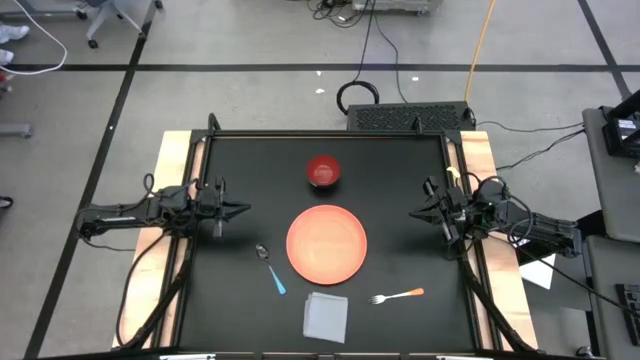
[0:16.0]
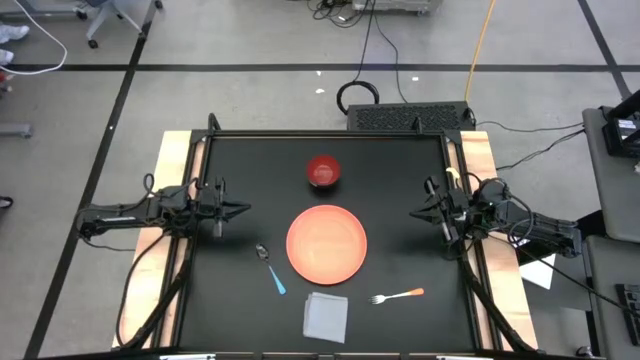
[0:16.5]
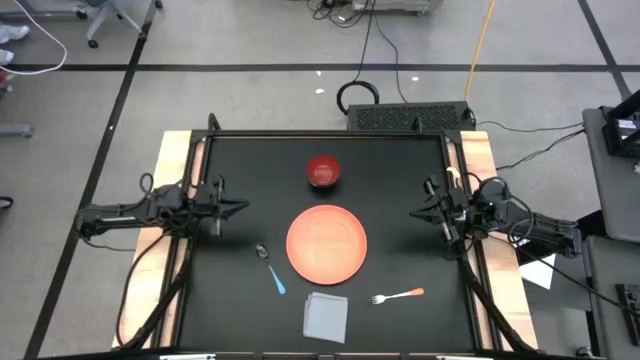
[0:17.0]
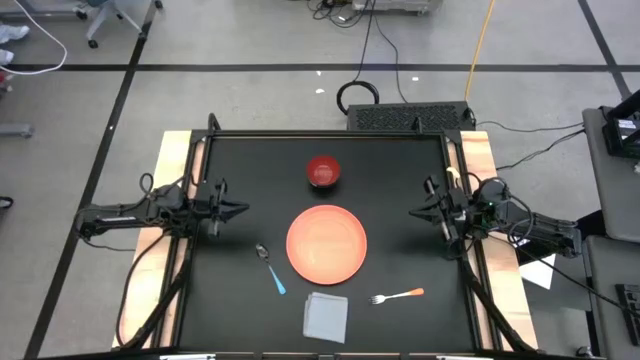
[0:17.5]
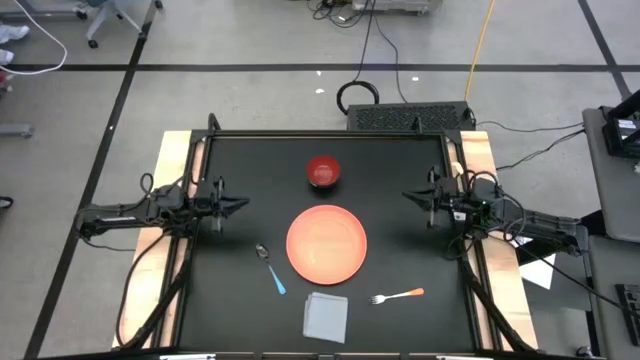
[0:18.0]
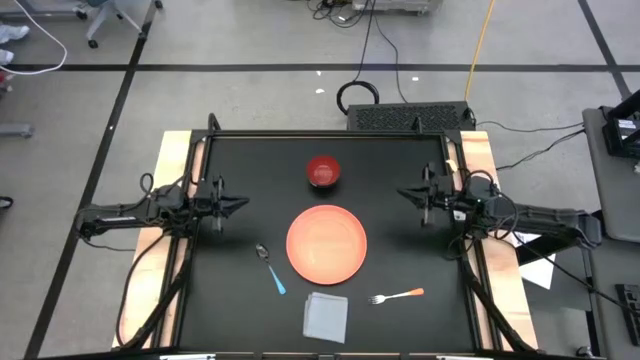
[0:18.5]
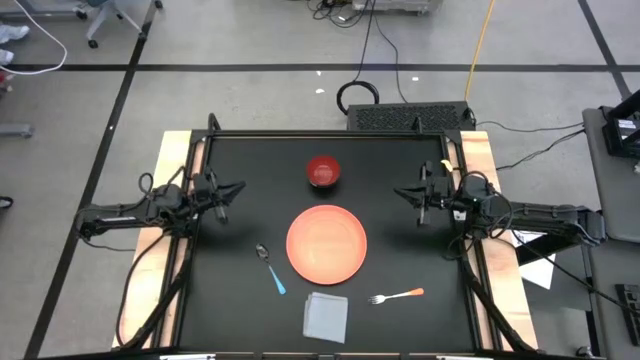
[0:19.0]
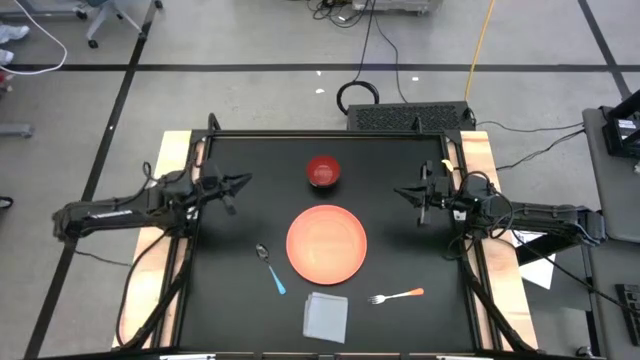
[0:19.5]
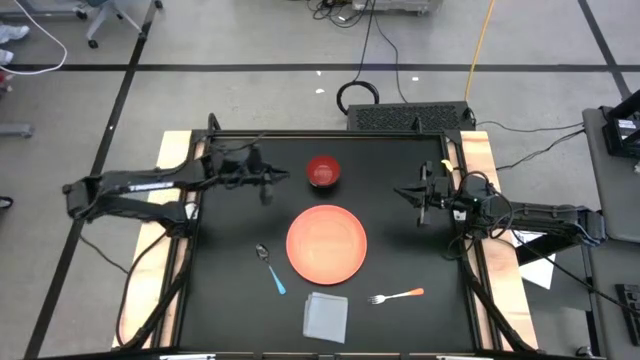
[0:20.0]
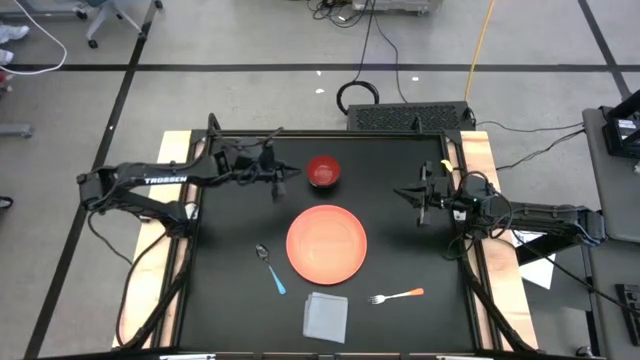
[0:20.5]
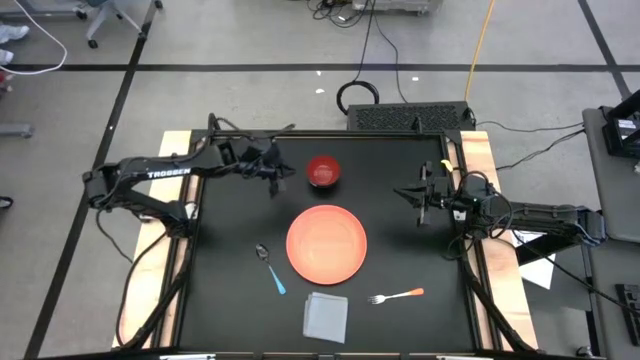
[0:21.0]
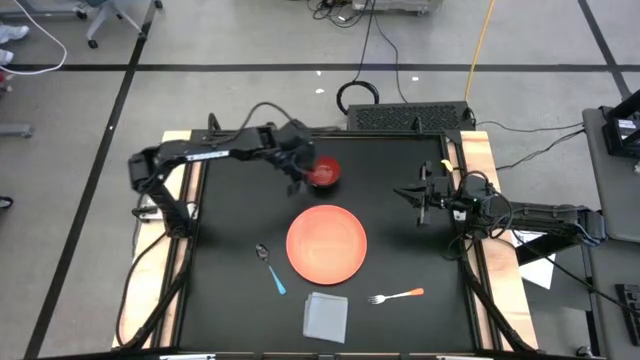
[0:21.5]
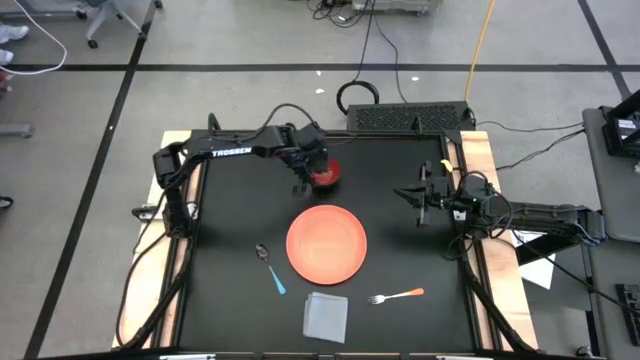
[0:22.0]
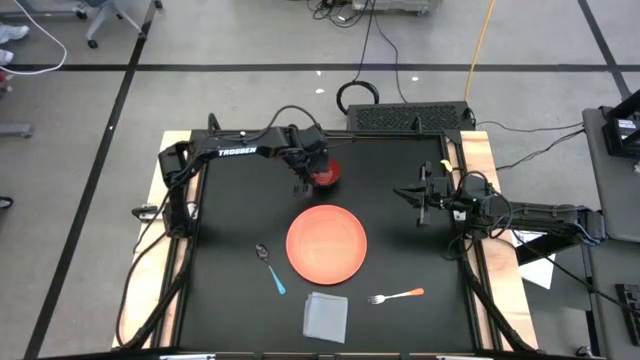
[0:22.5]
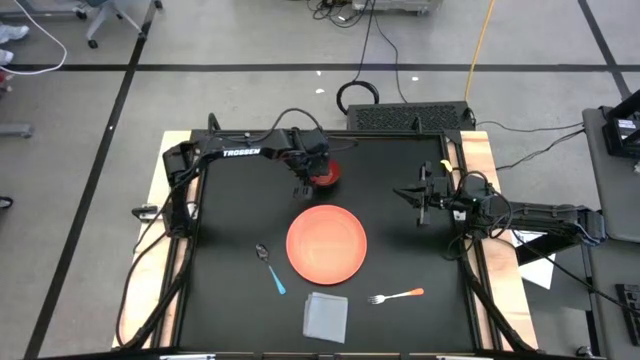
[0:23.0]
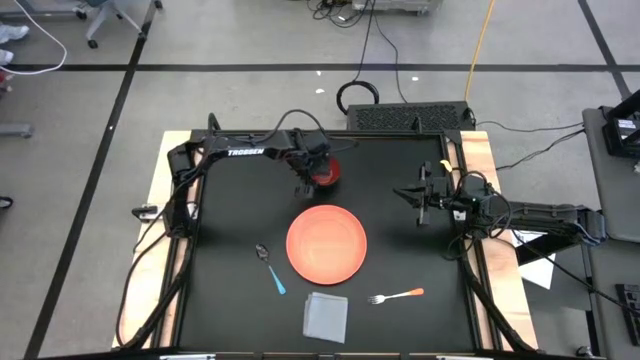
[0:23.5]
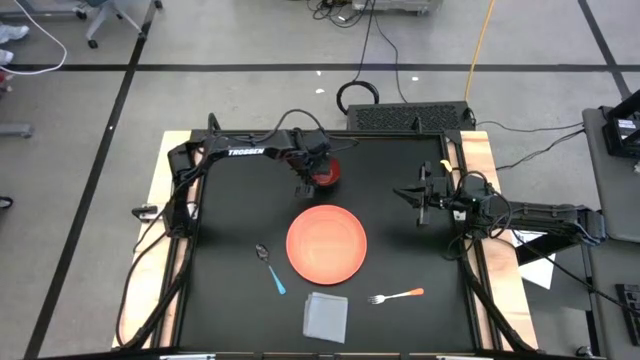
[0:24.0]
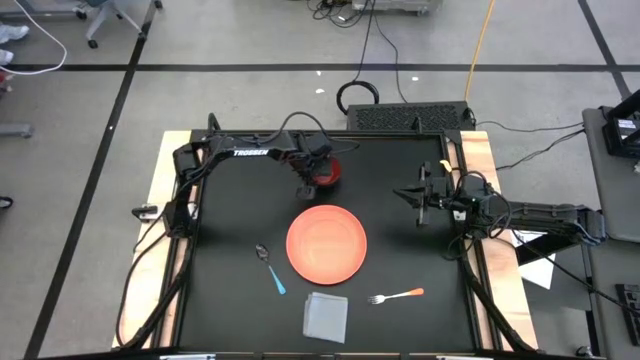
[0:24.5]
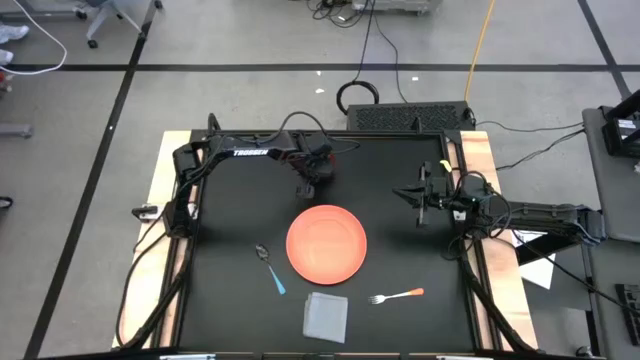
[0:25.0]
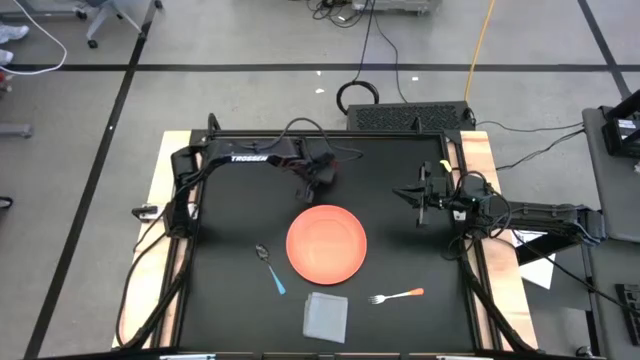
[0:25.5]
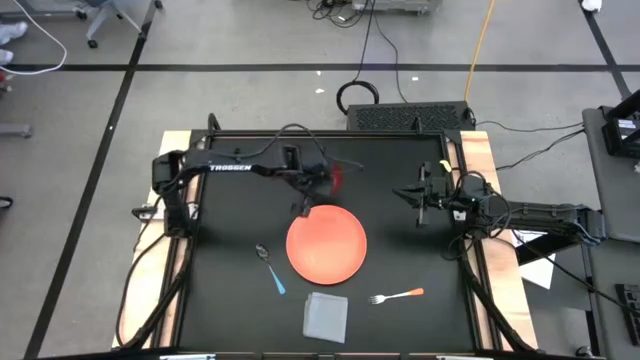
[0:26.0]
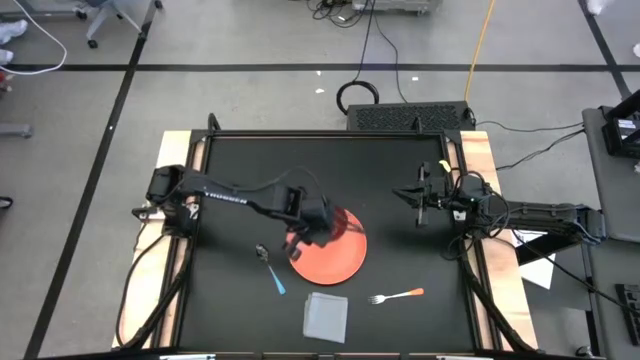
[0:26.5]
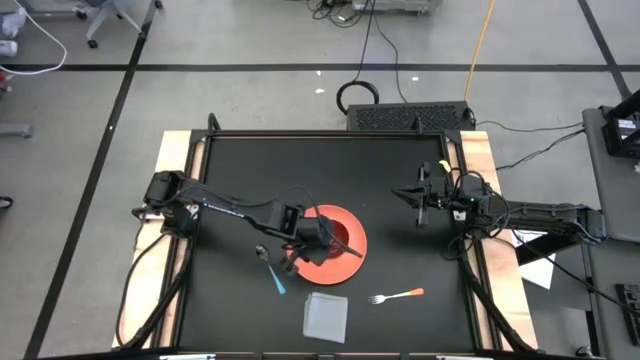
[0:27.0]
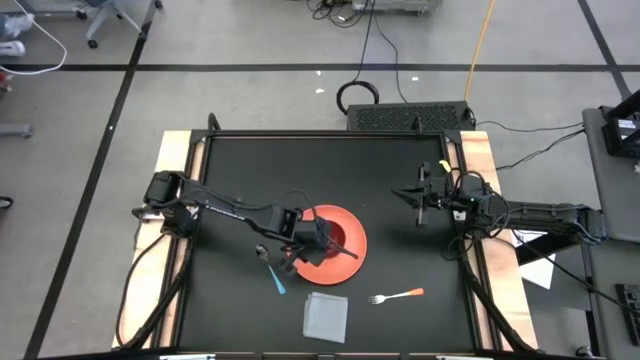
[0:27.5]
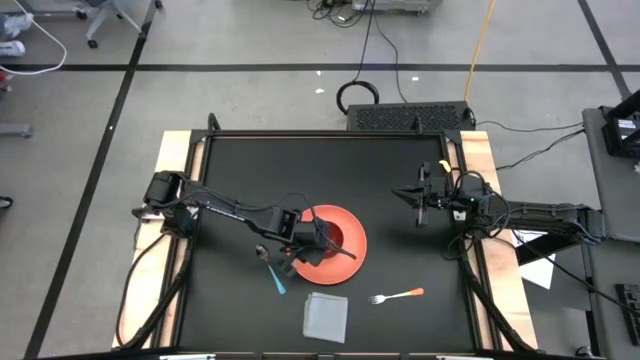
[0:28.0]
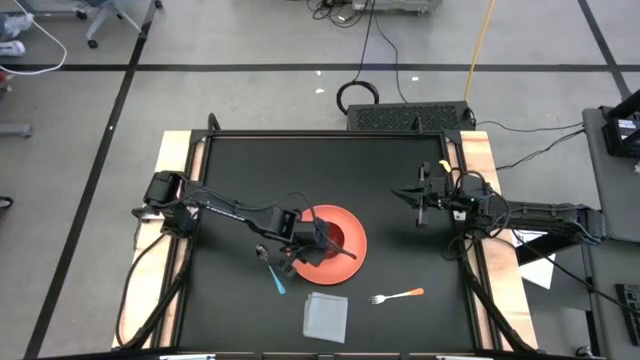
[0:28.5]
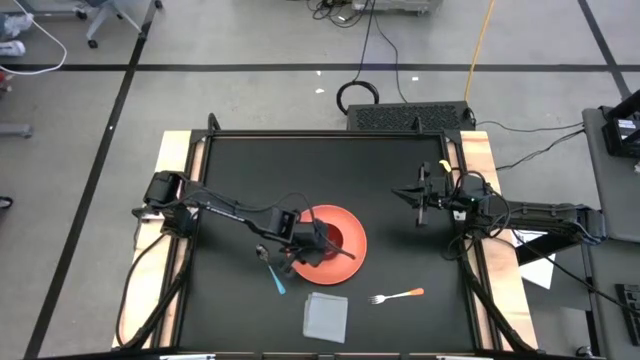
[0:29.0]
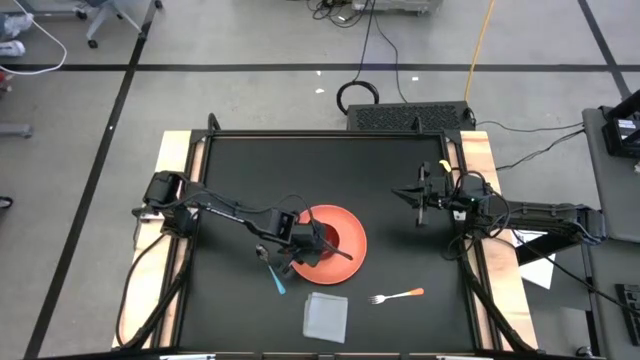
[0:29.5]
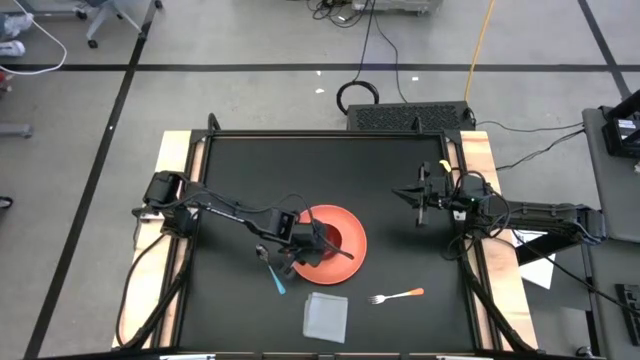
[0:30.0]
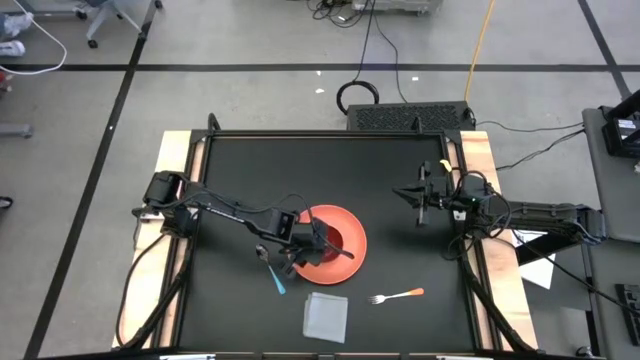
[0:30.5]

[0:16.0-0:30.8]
Task: Set table place
Put the brown bowl on the orange plate

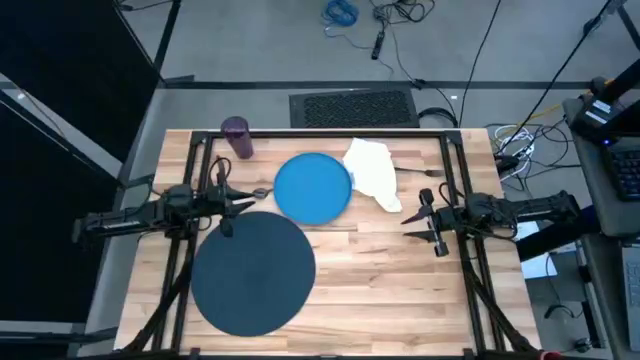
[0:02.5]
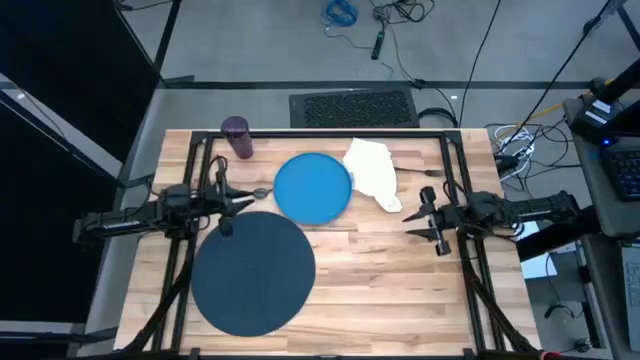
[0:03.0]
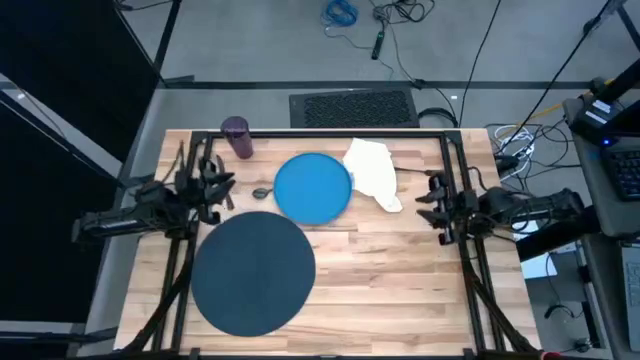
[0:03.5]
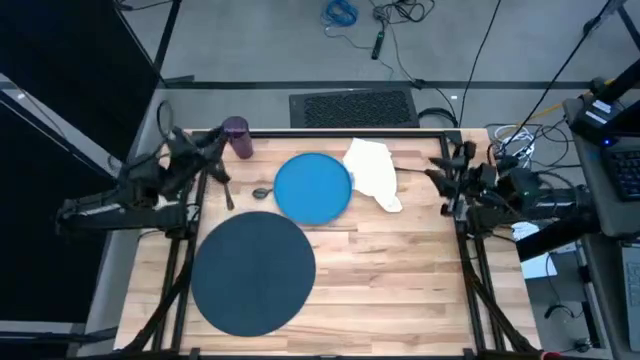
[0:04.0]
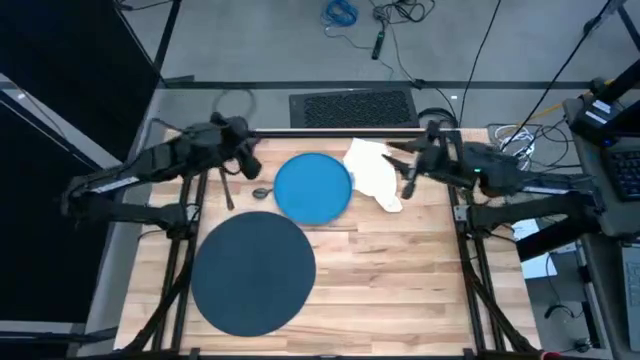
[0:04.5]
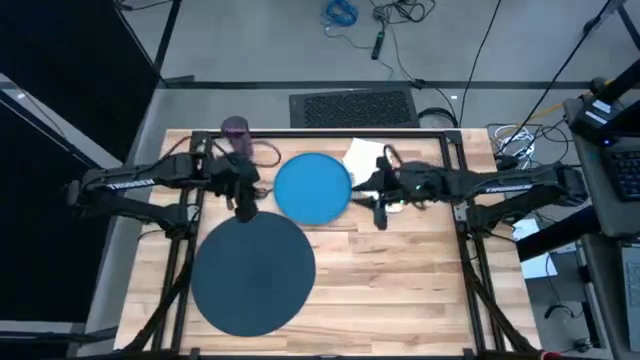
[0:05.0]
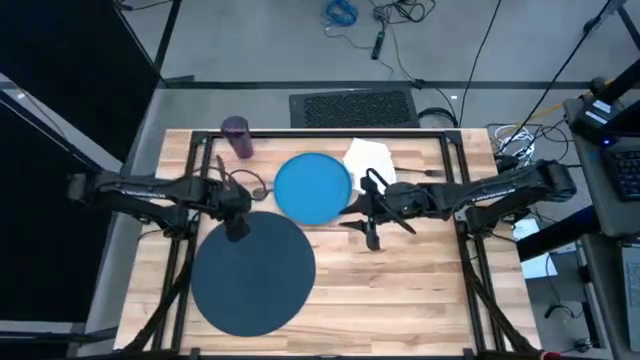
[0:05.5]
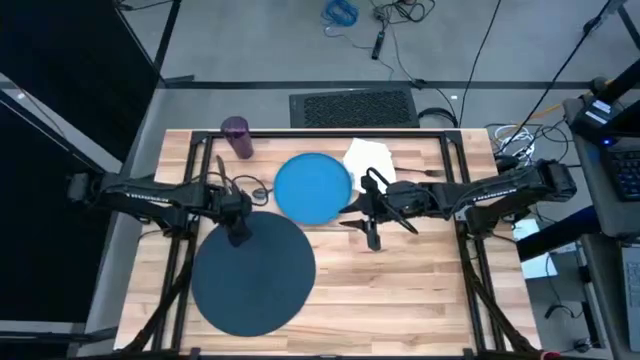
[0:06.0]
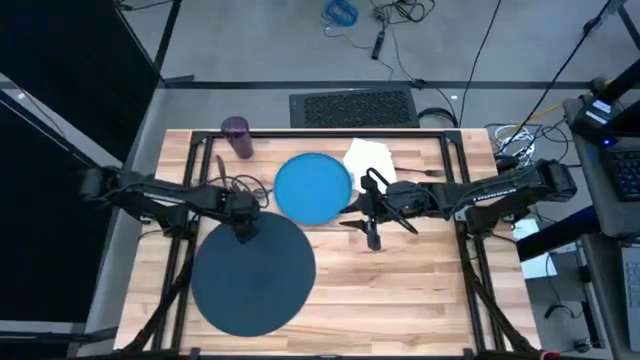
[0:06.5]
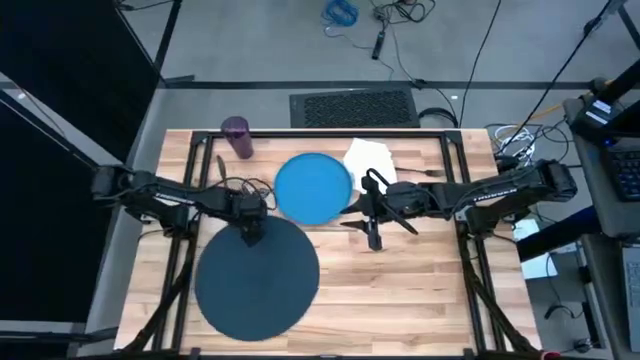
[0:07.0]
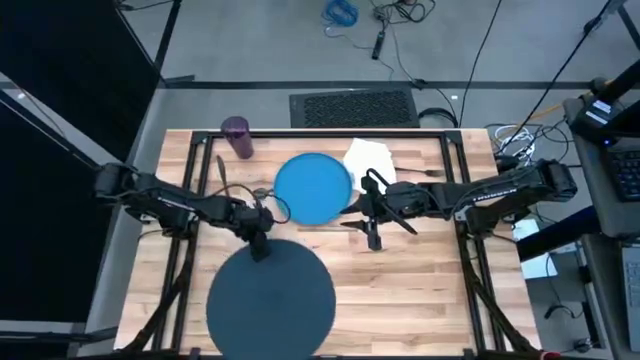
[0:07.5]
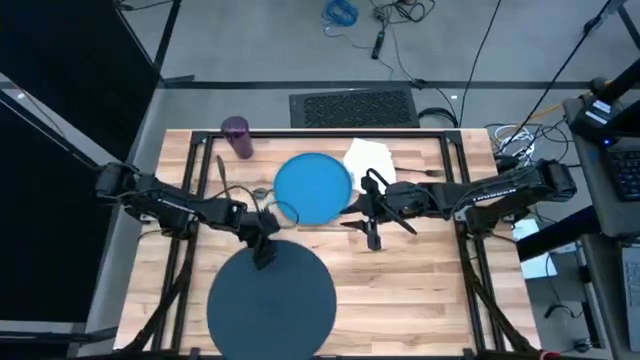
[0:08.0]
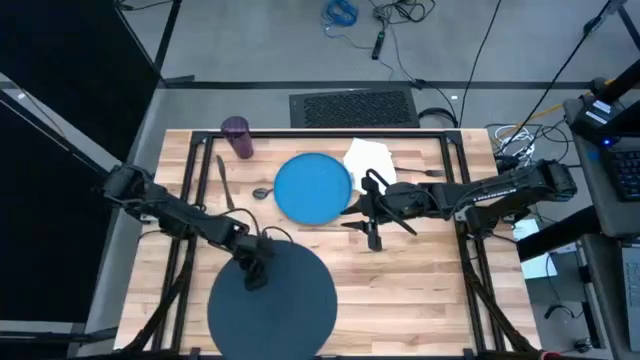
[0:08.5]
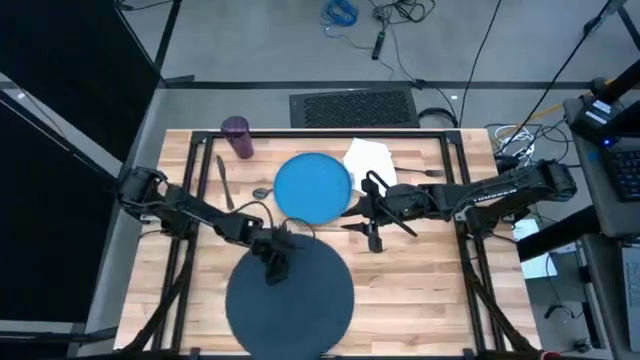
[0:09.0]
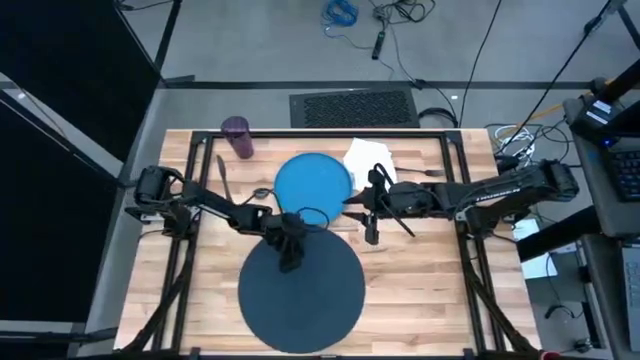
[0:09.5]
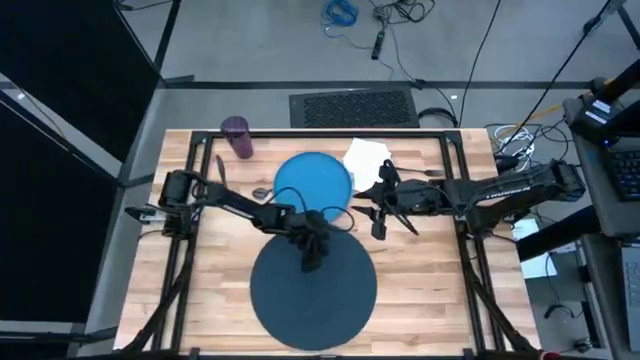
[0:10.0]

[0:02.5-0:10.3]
Task: Set table place
Move the blue placemat to the center of the table
